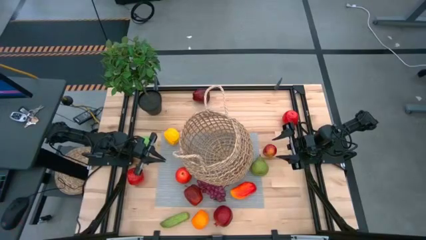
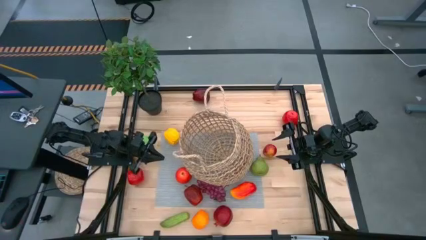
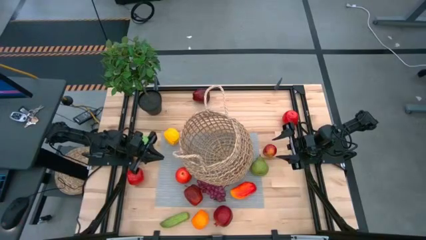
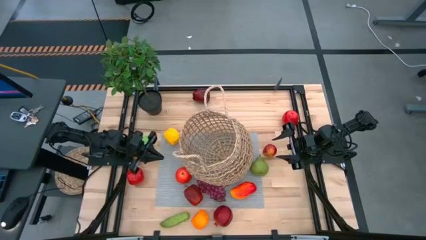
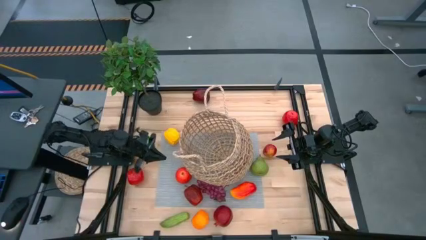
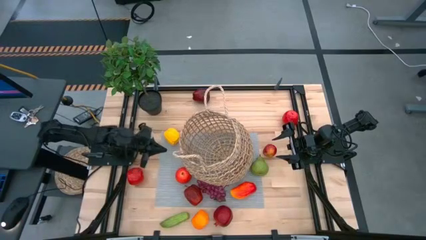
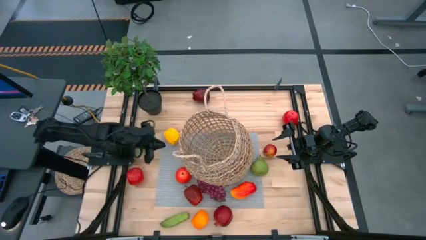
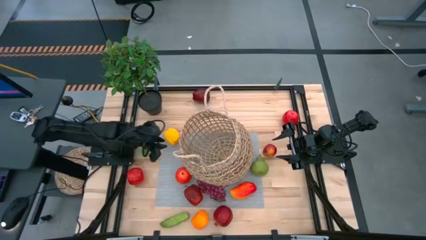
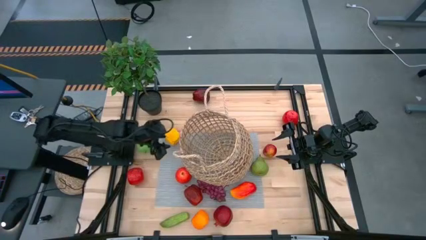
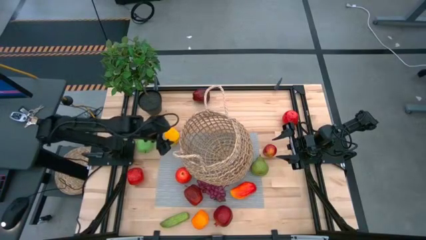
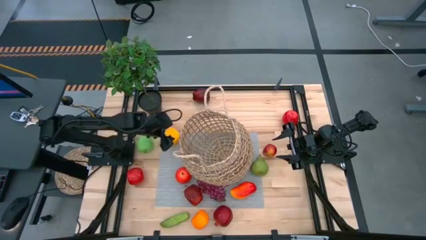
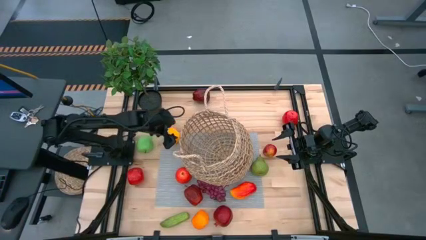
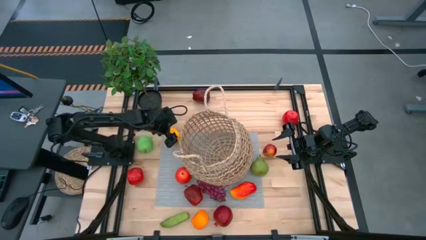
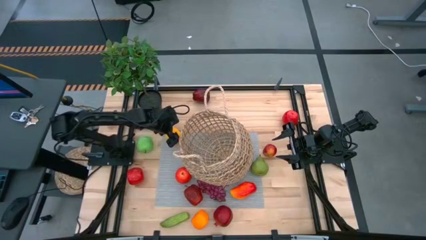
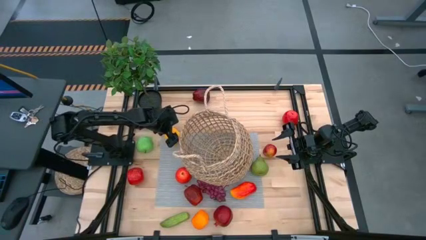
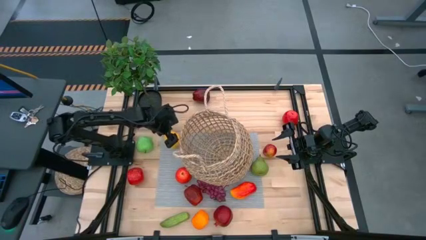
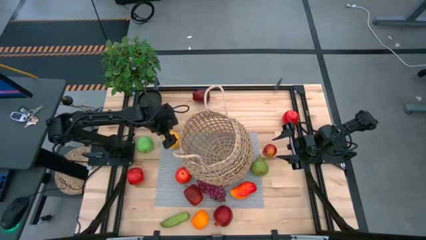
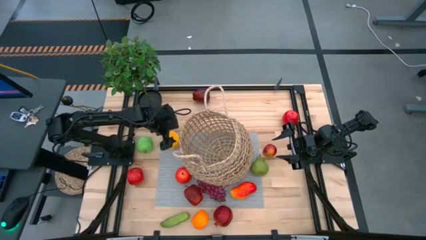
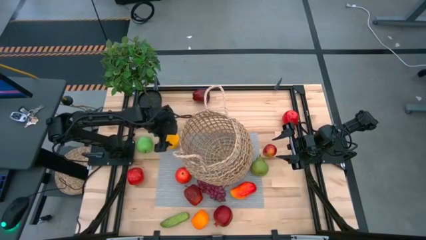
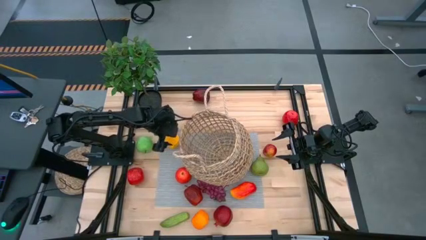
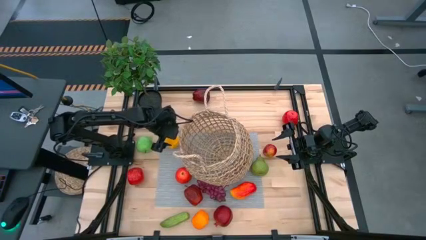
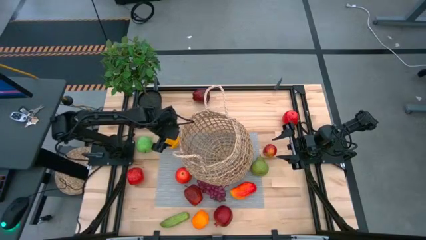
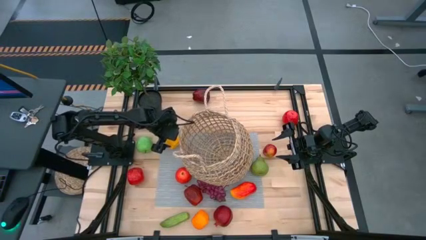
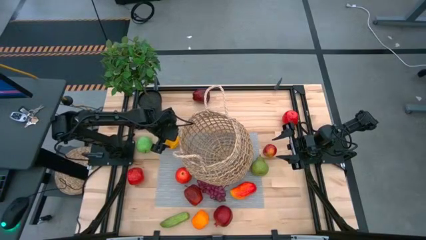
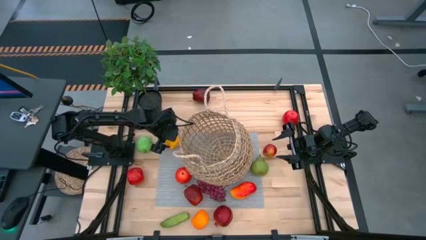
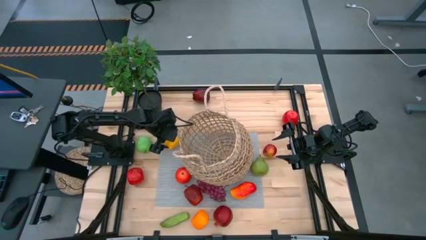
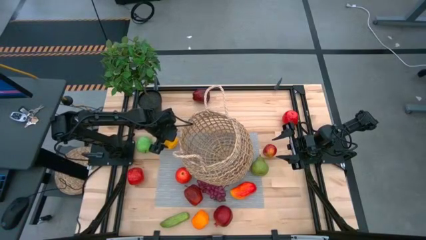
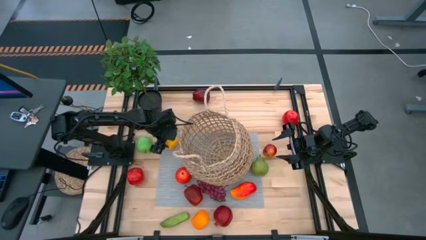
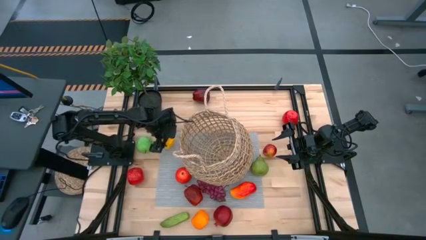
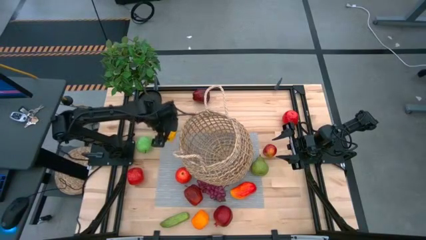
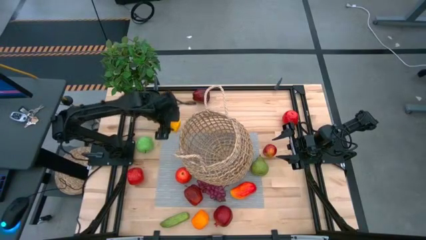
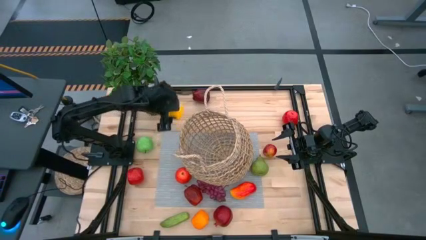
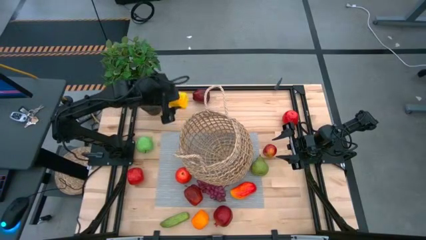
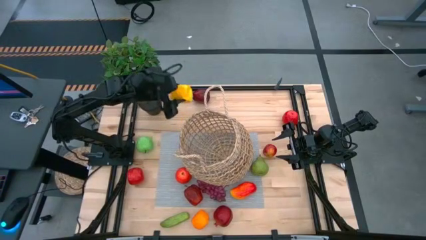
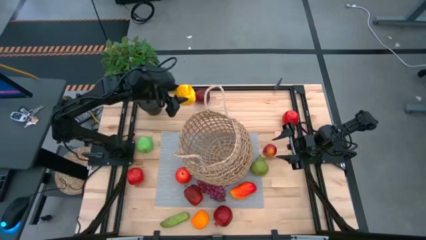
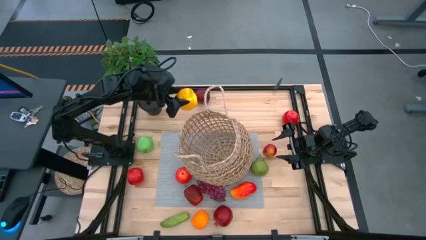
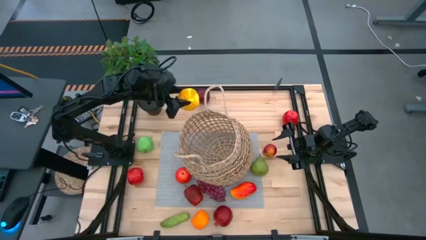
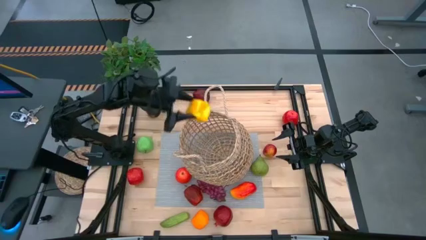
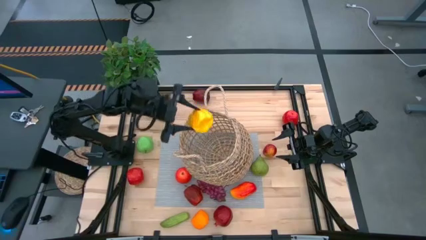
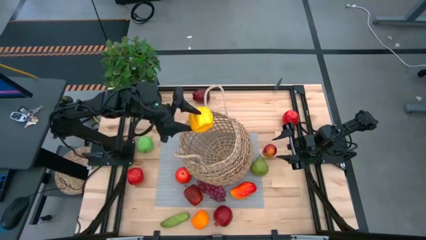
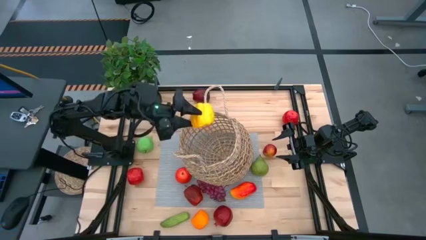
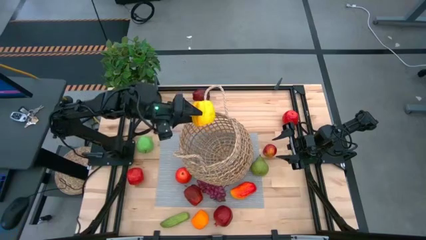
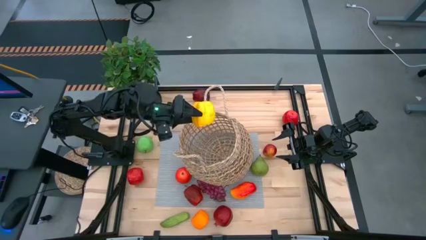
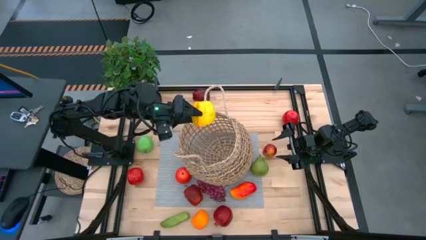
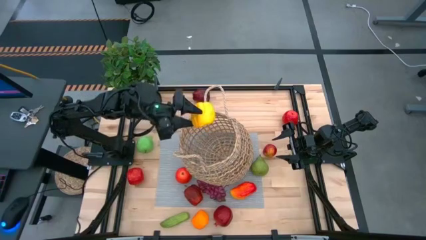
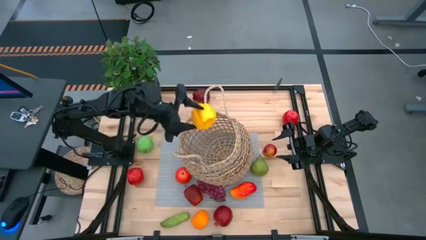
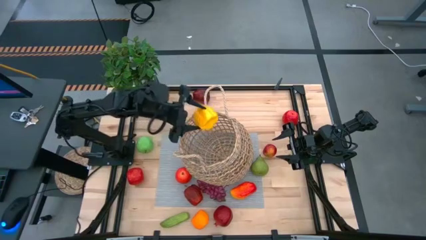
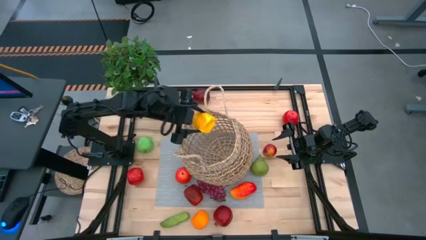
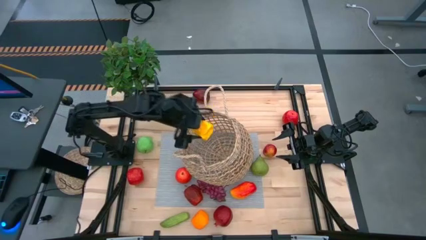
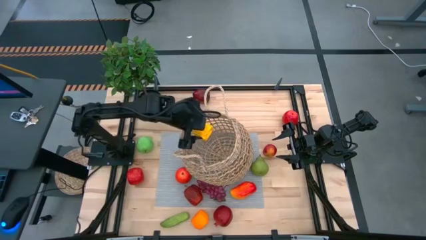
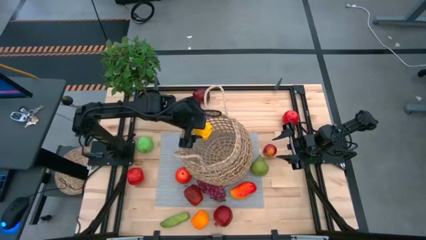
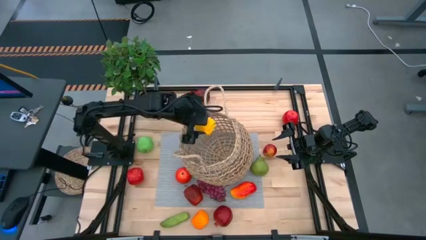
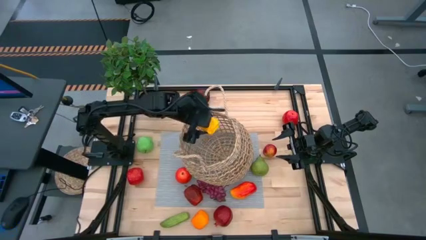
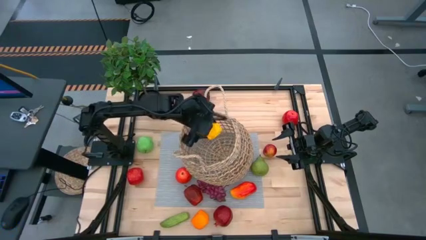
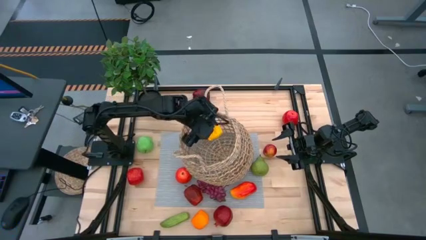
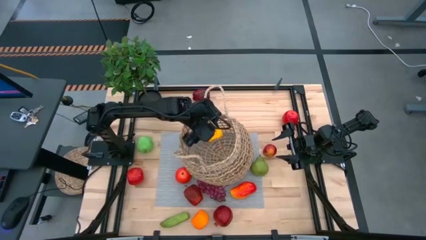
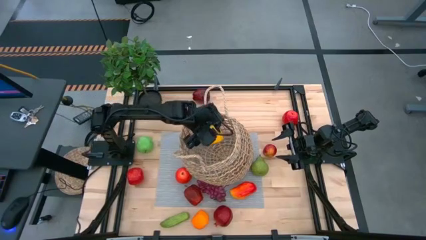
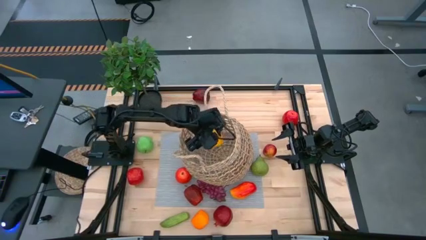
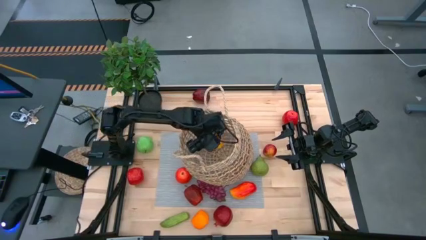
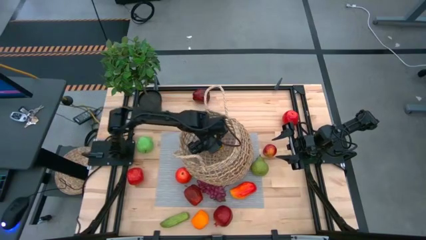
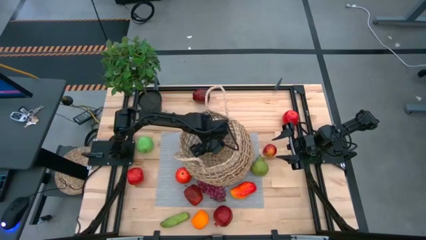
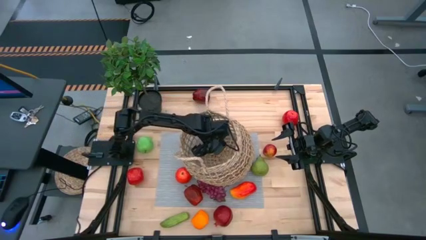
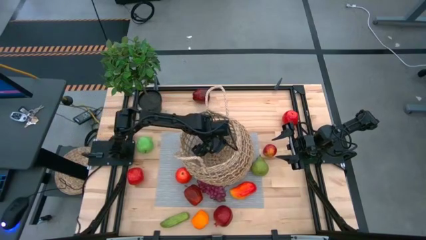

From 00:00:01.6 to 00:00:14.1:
Task: Build produce basket
Put the bell pepper into the basket
